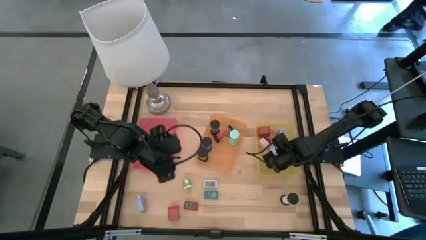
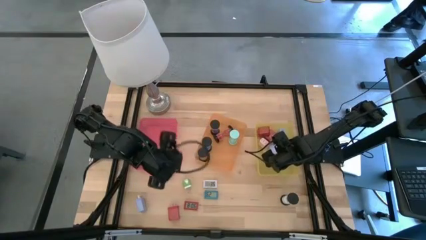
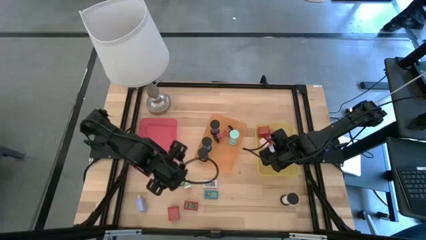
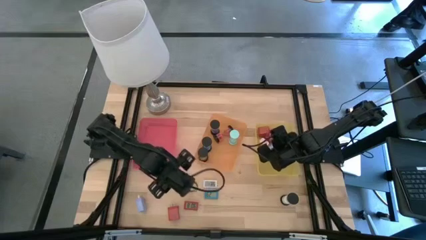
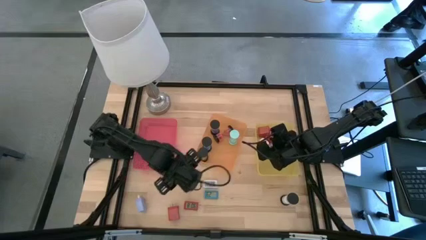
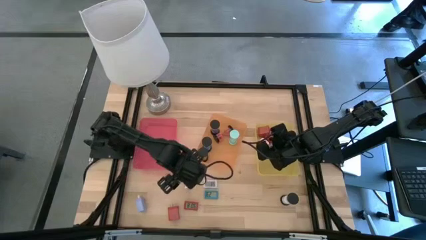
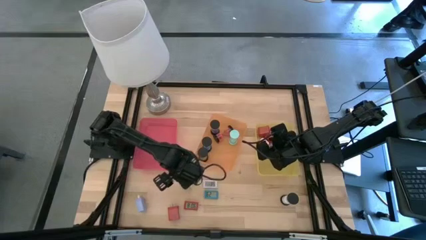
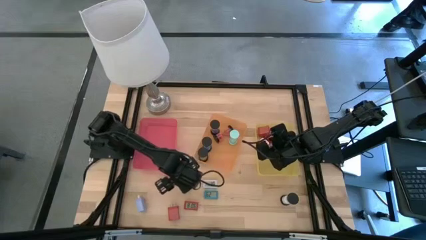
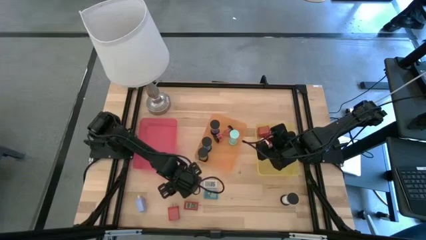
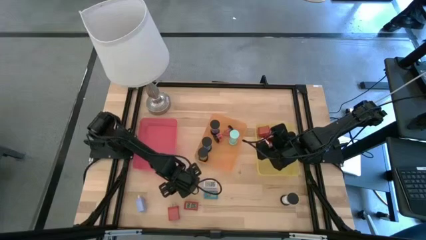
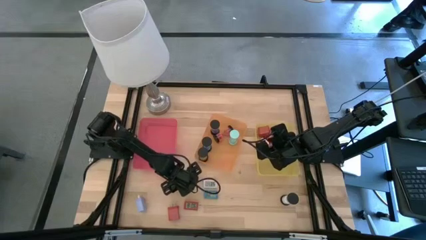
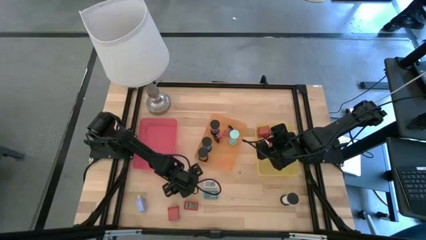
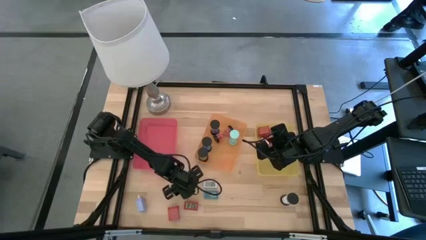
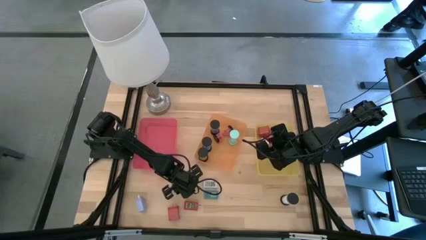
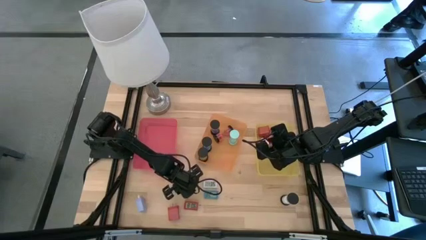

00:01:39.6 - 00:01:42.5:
Task: Pick & Place Office items
Put the green charger adapter into the yellow bin

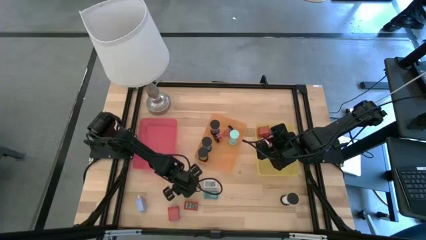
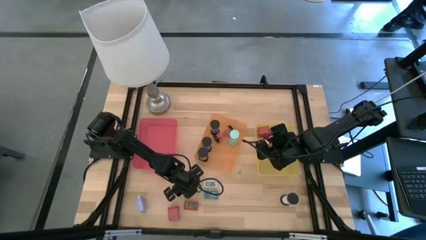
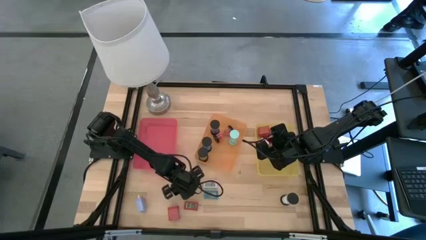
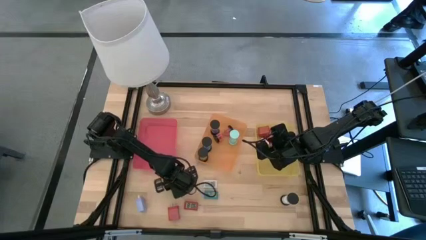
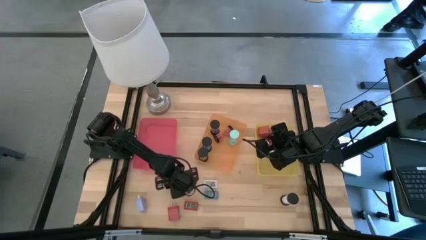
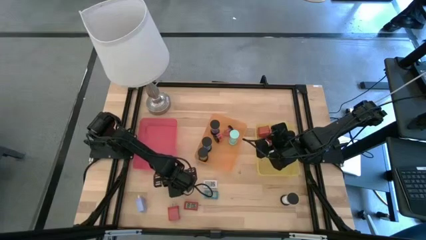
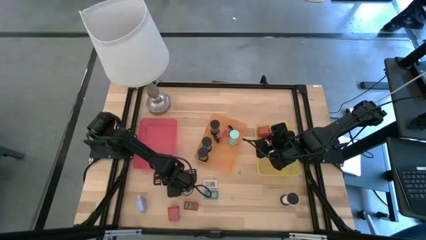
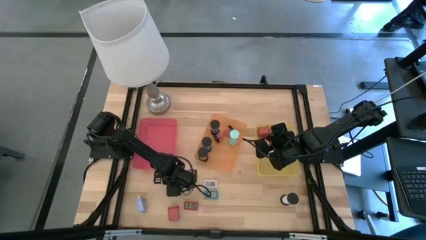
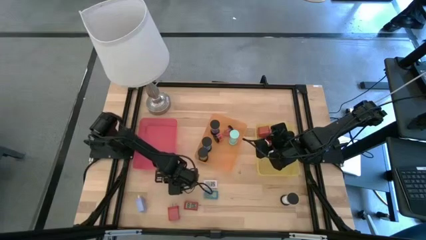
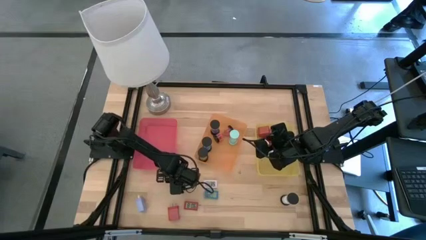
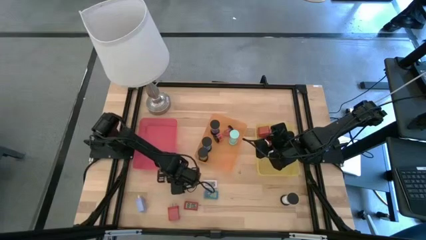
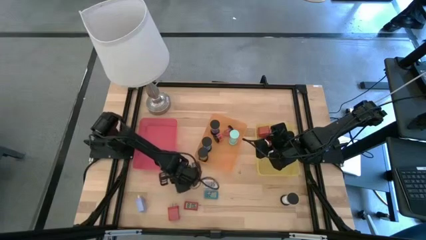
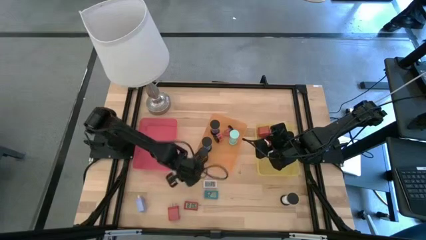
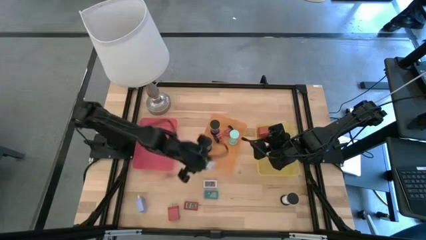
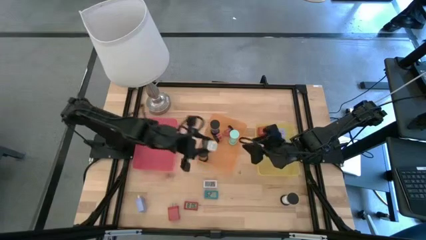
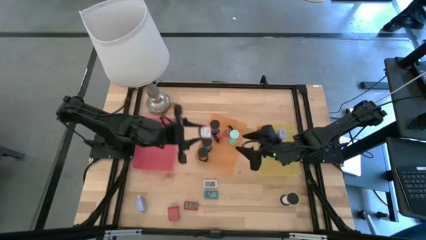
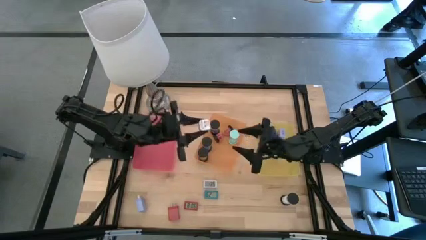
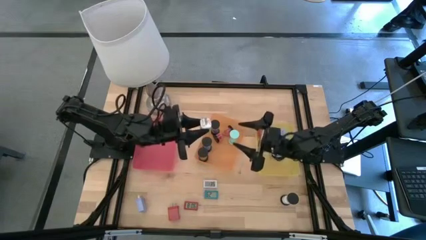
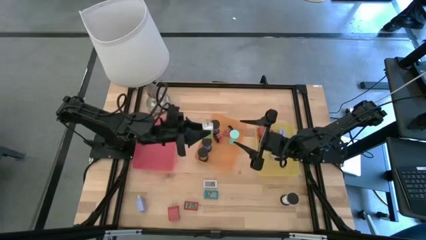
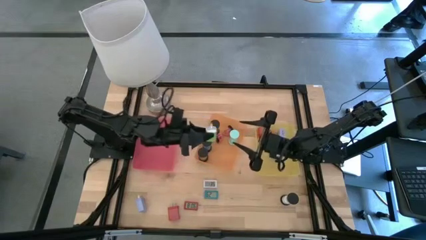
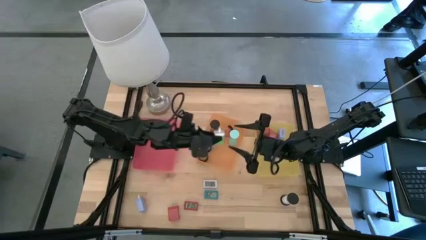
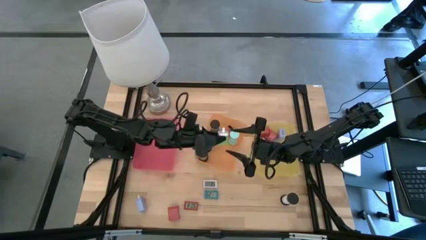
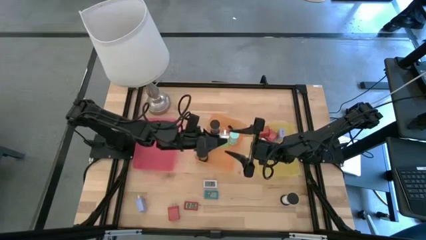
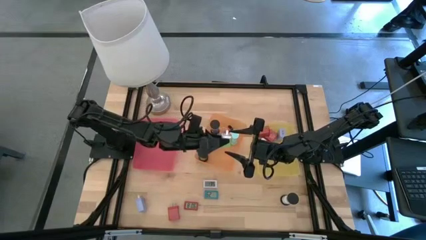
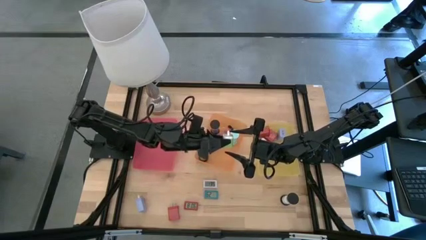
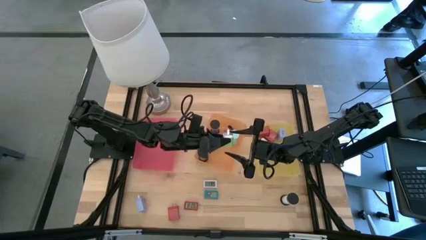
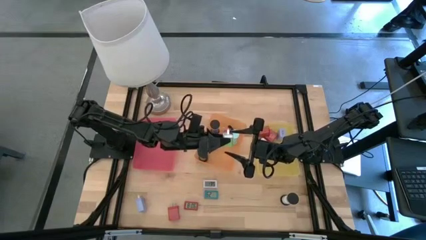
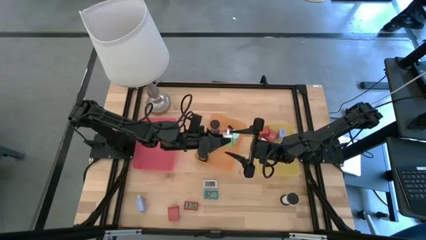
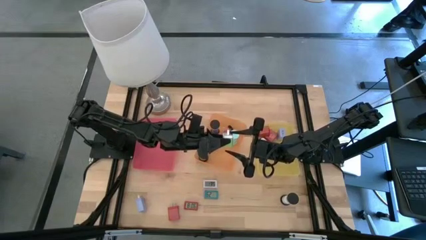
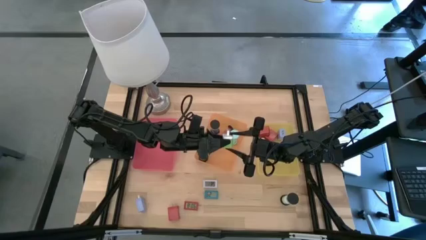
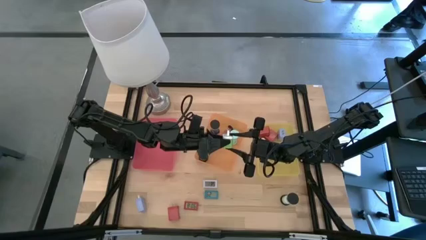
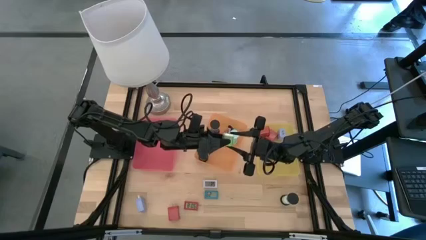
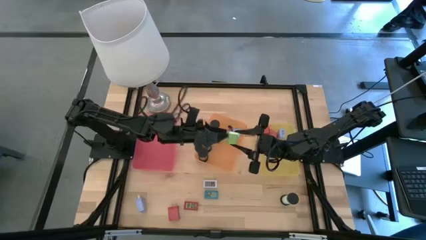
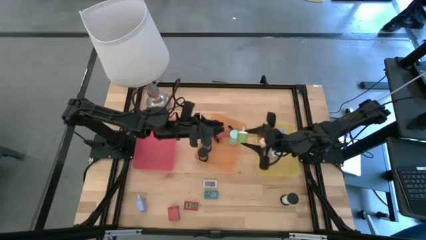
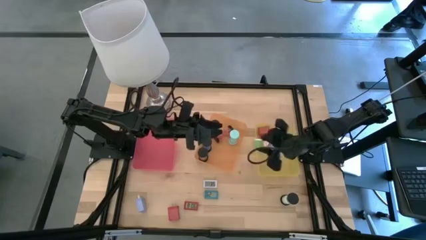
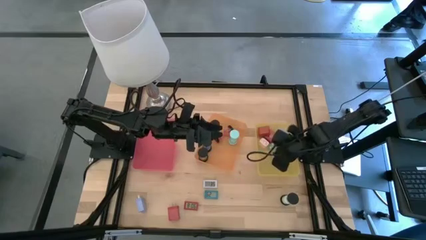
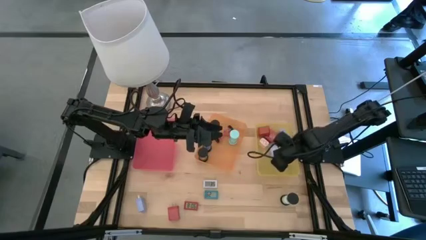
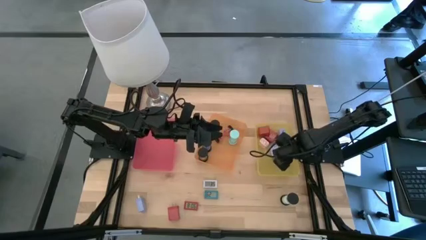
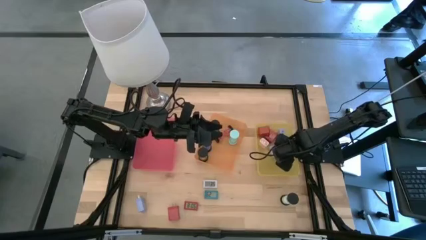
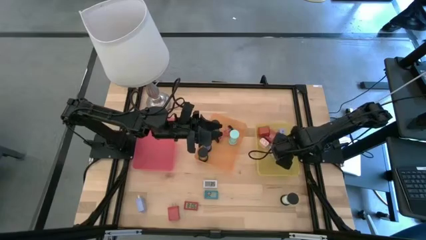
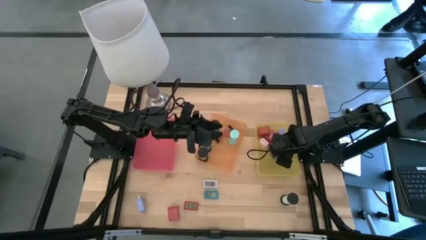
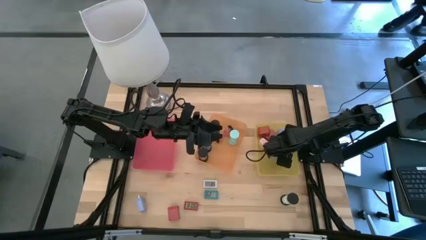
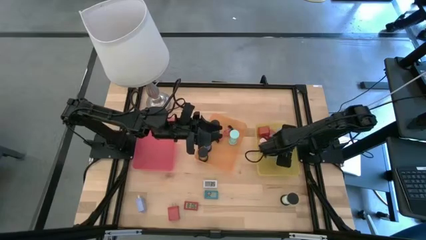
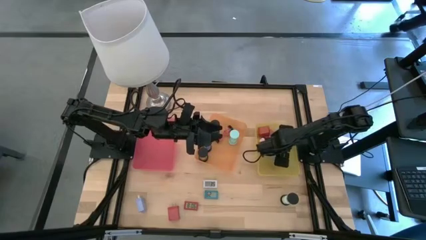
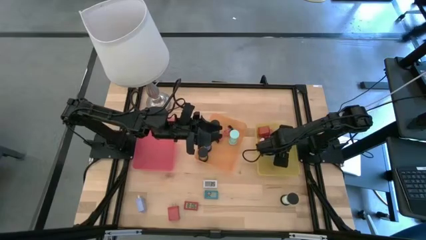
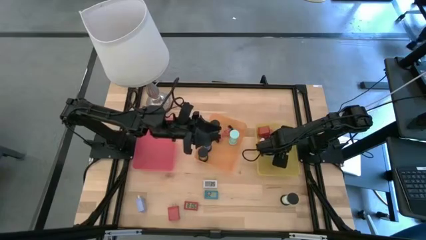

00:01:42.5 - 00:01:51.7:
Put the green charger adapter into the yellow bin
